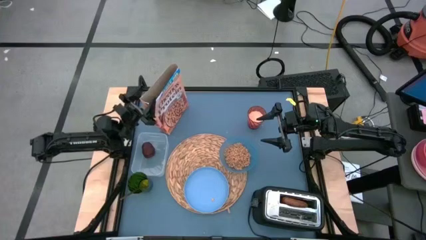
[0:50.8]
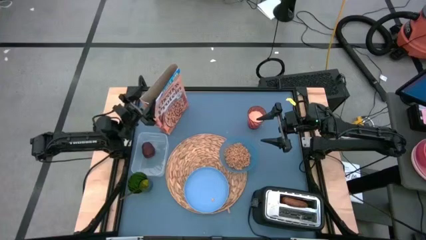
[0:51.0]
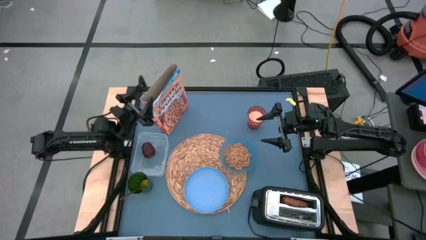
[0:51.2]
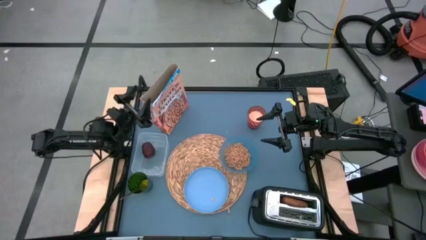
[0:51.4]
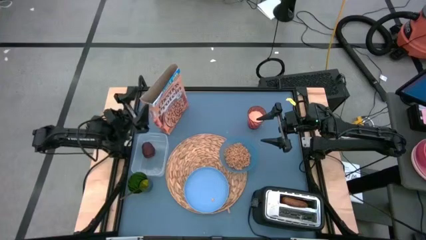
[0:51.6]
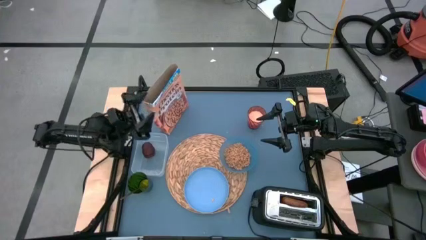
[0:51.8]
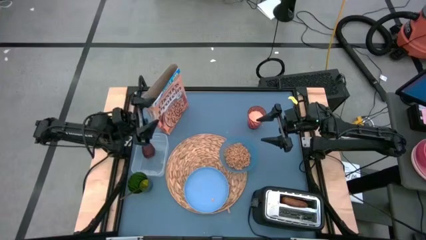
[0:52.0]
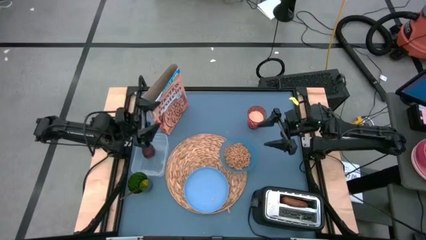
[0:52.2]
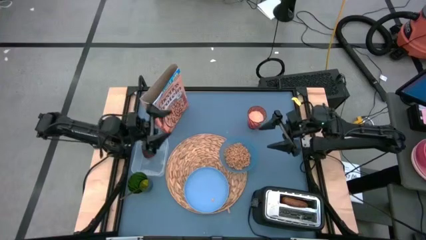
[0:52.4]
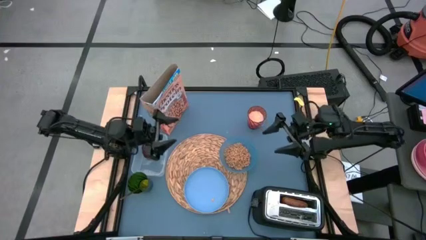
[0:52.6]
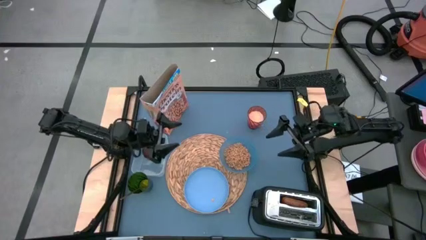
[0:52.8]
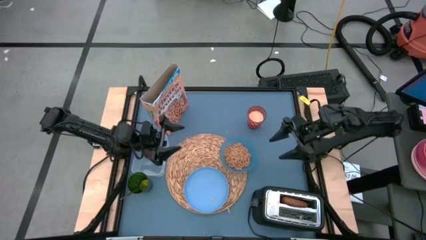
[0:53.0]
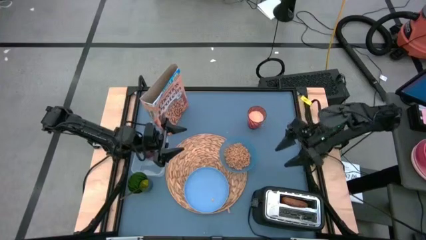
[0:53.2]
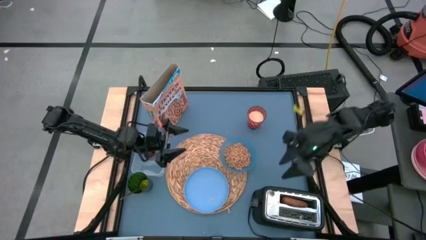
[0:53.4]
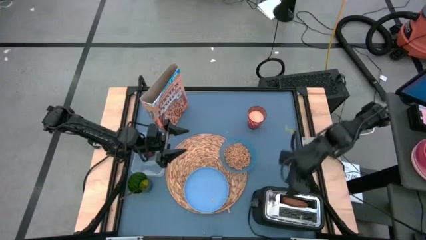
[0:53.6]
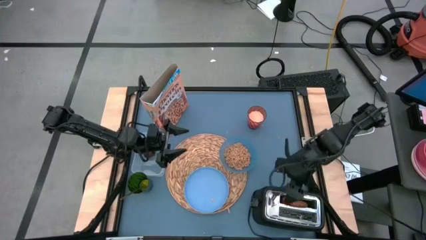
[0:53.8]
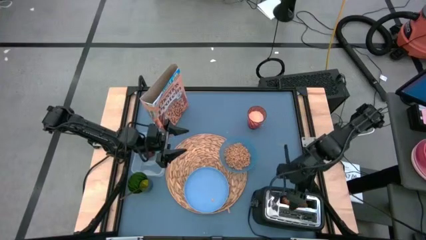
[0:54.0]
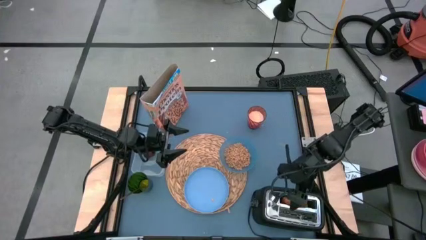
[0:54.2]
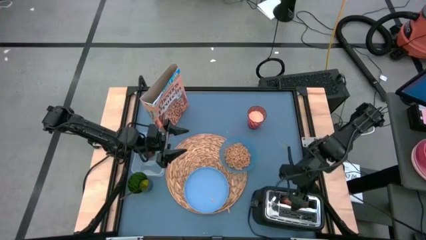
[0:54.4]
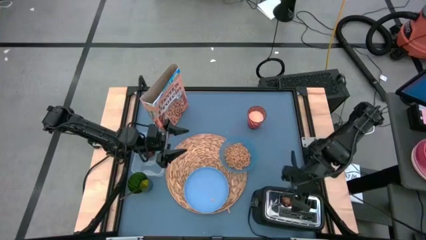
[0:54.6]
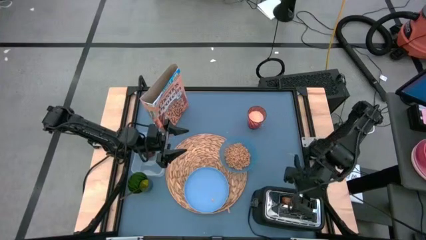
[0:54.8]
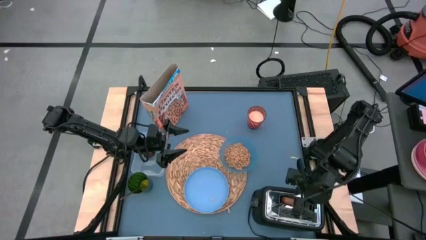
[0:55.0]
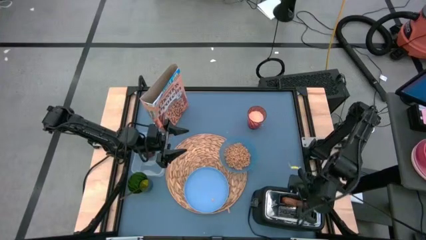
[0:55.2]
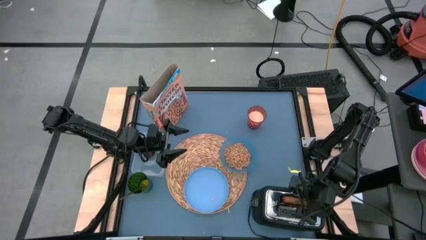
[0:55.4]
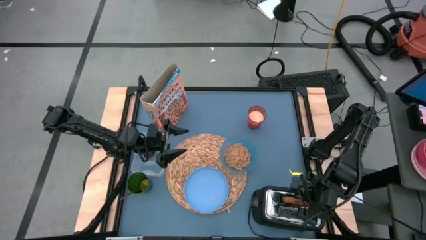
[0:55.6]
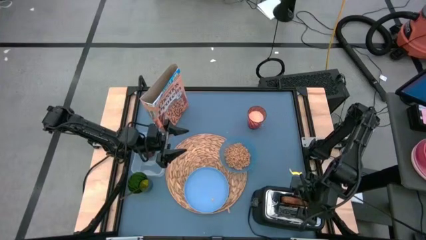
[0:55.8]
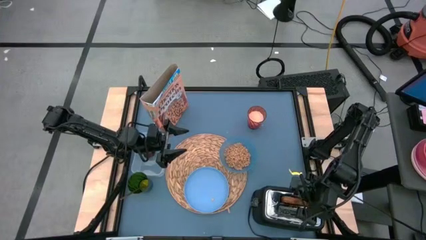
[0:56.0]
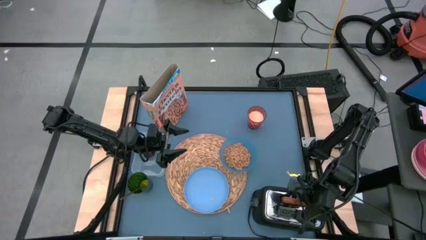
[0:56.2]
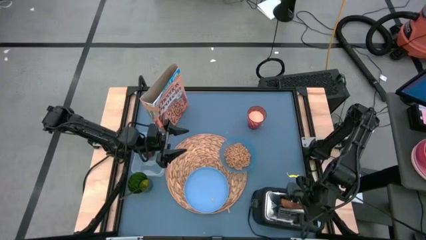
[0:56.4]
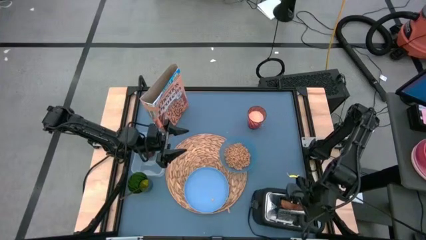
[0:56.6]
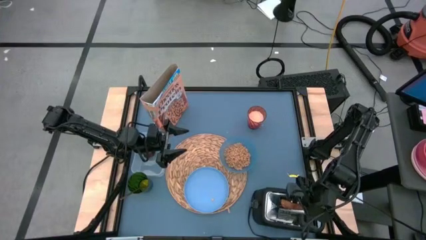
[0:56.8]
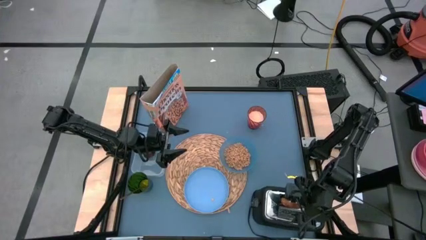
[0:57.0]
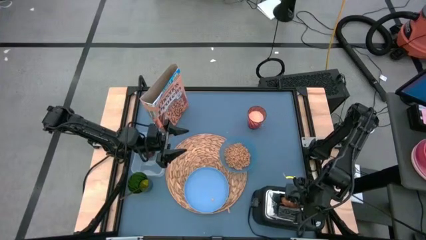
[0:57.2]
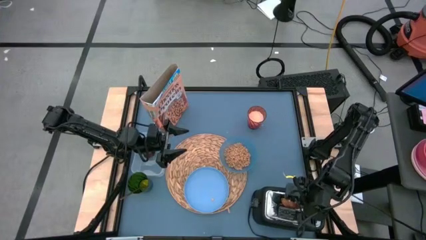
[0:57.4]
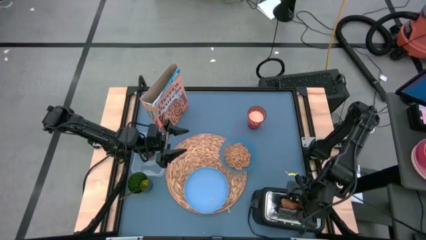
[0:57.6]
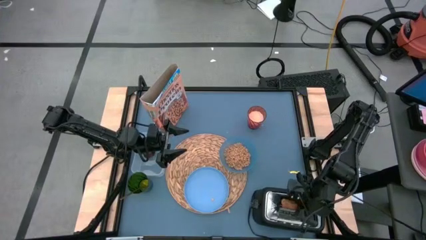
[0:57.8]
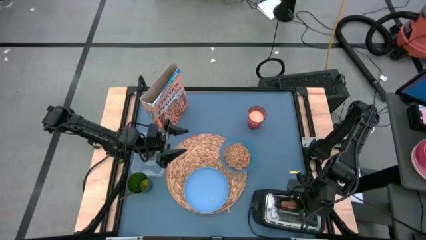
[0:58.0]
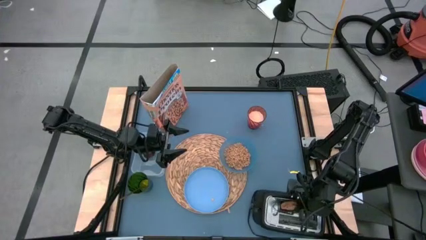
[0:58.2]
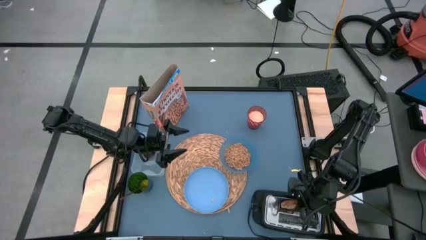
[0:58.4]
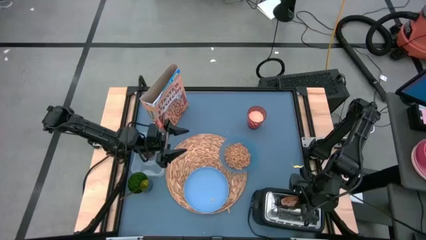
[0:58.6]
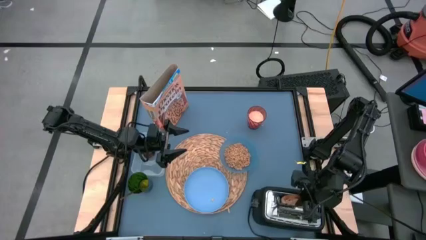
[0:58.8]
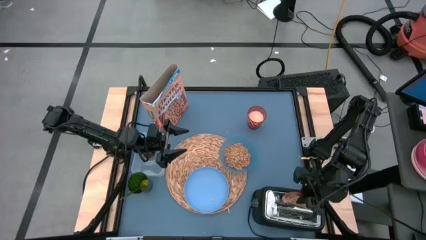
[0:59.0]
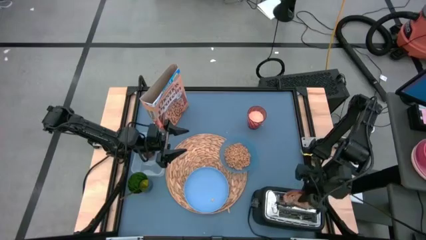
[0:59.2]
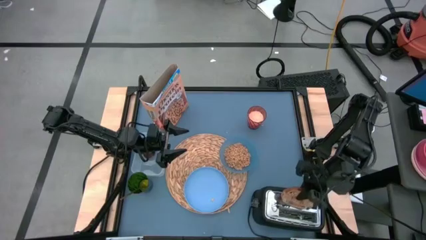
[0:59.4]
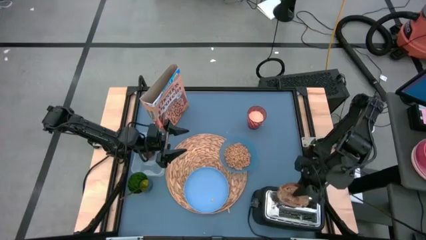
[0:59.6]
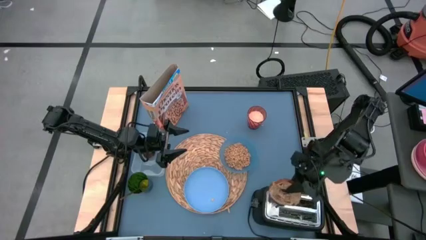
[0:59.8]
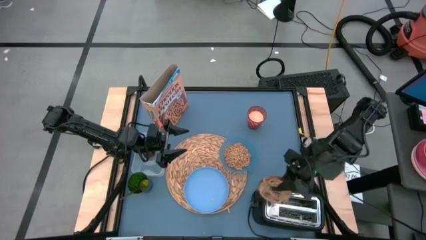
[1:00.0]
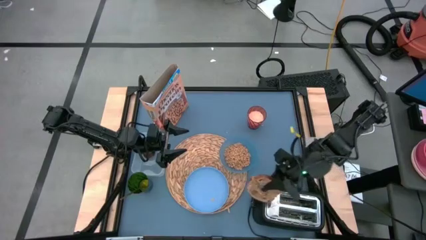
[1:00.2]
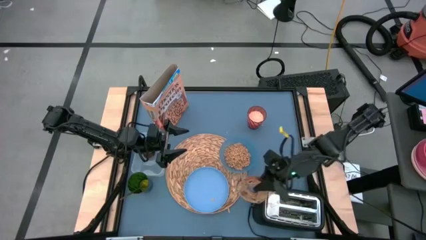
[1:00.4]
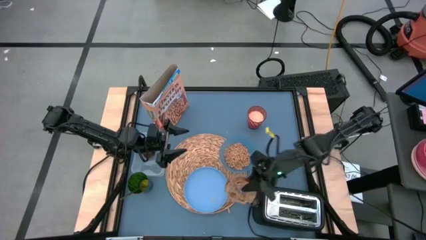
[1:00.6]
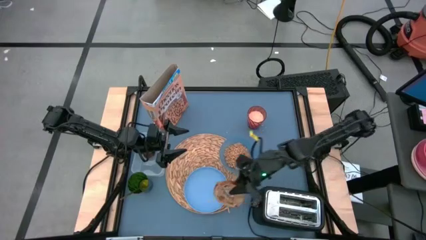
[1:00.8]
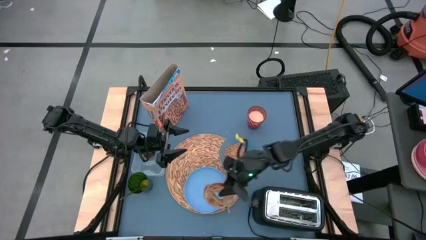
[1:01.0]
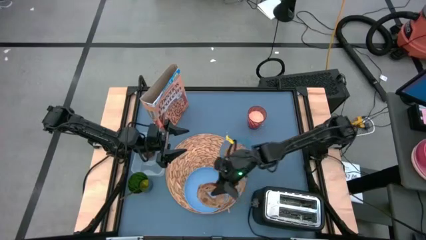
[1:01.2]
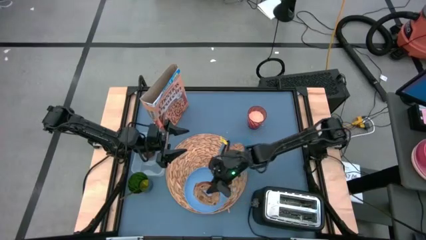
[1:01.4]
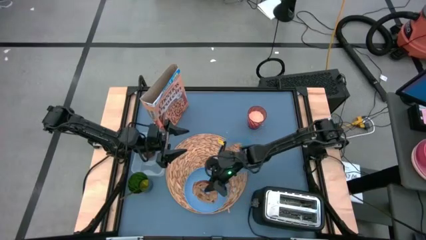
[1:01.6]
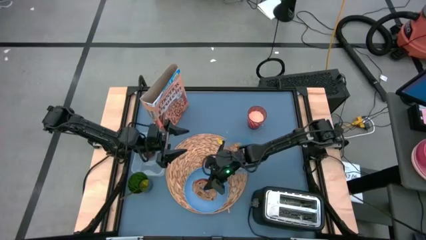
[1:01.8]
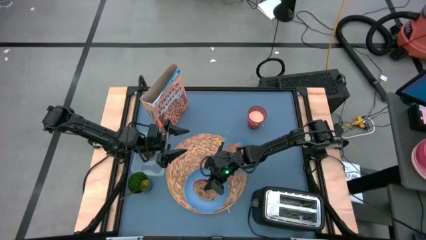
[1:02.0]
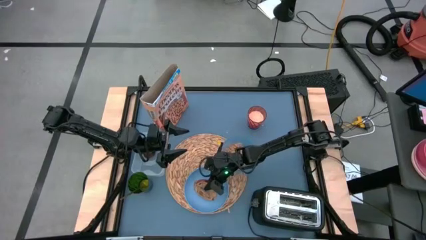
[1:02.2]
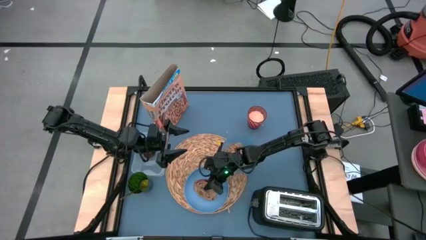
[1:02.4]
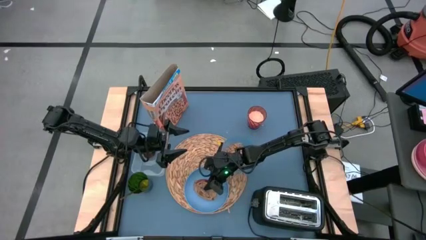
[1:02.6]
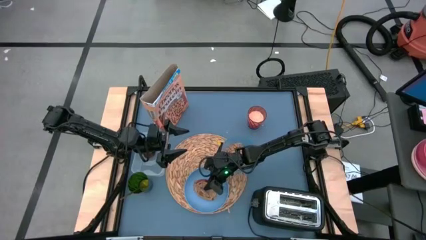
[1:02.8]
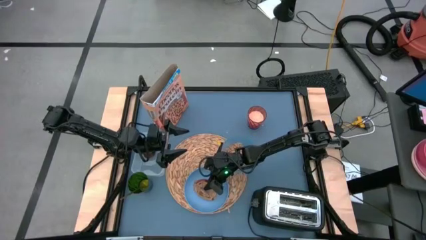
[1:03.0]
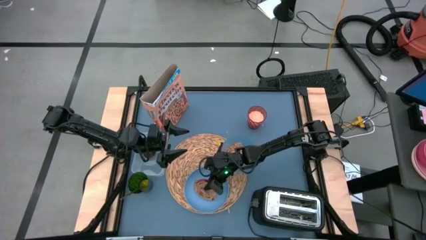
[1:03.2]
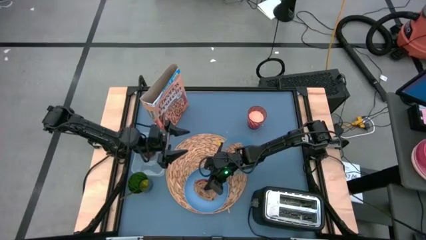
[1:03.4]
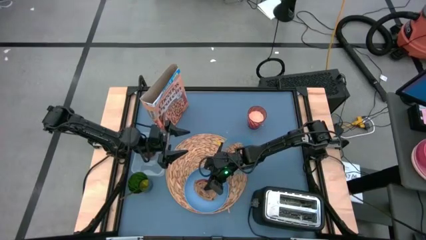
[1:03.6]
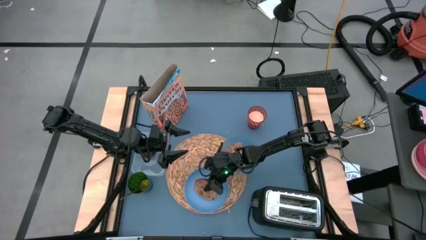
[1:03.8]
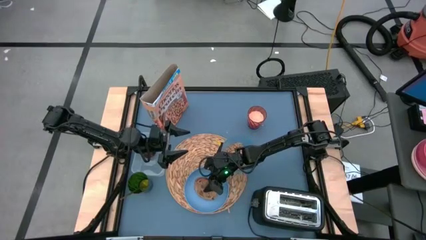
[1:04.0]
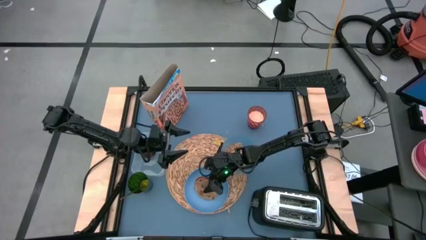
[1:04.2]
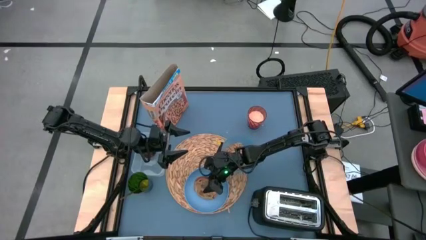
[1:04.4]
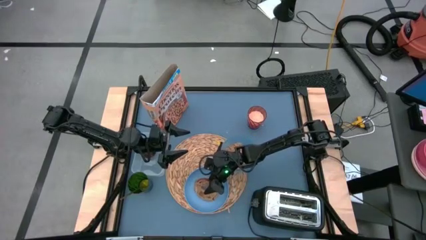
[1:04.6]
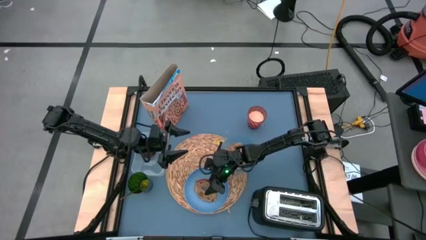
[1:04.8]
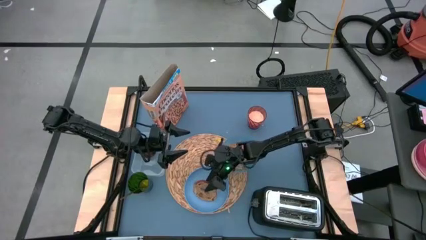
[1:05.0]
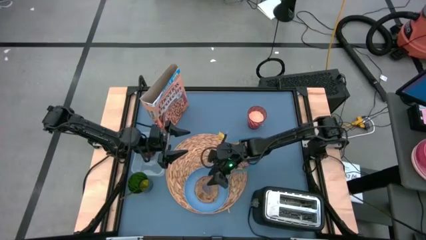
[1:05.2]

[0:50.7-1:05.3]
Task: Arrange a breakfast setting
Put the bagel on the blue plate
